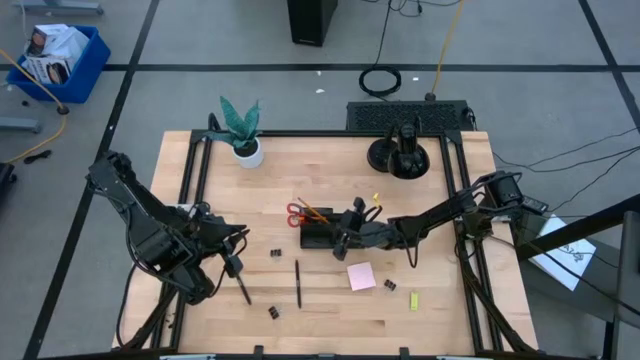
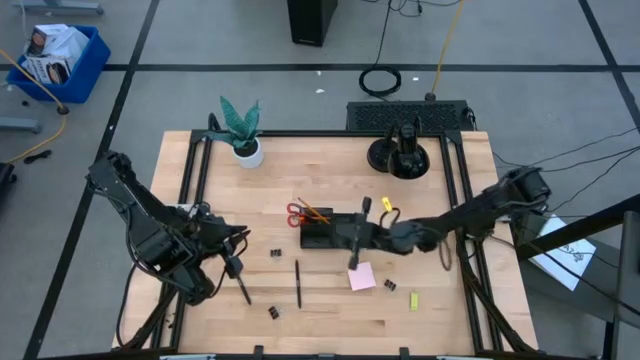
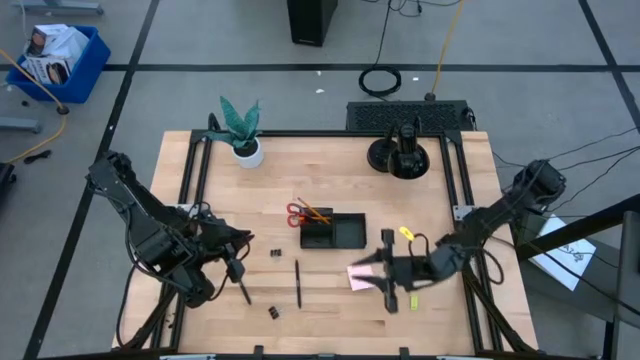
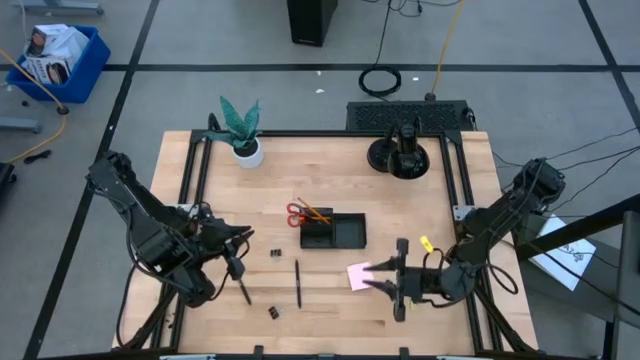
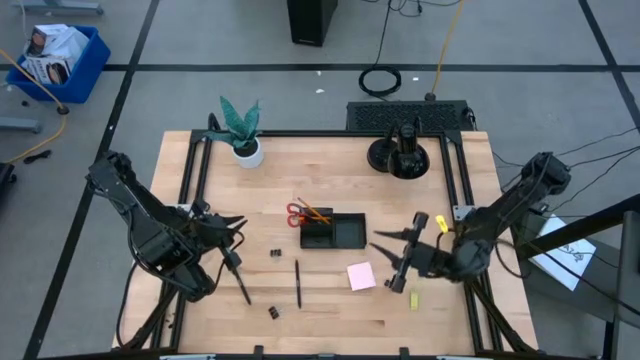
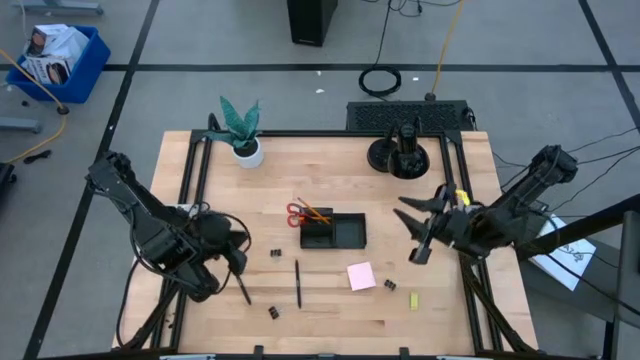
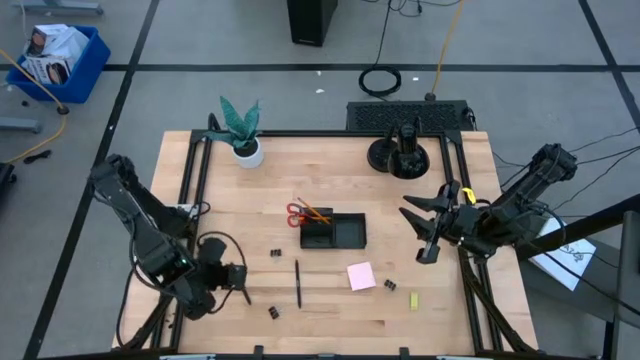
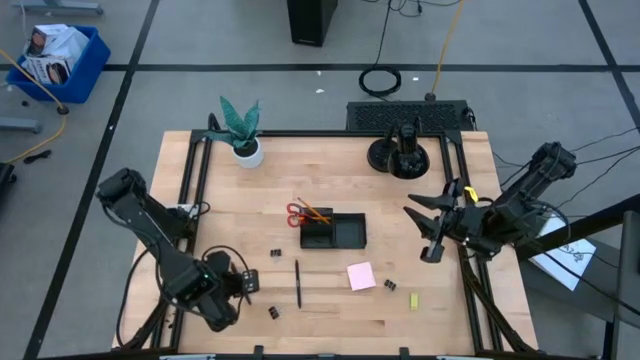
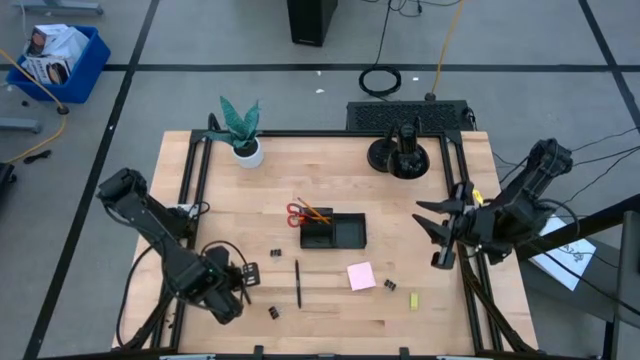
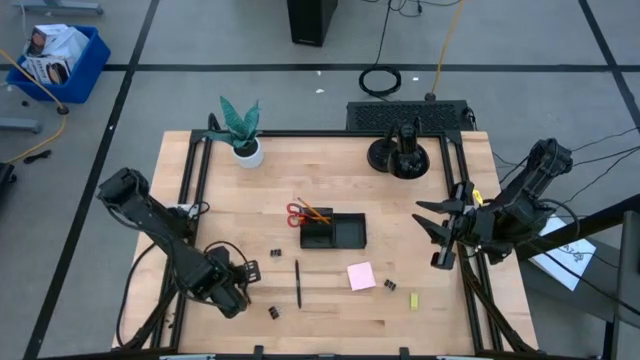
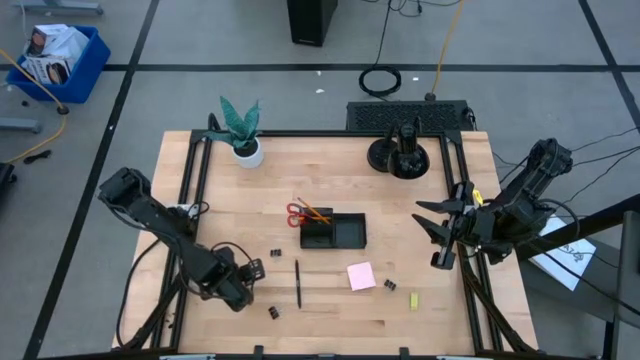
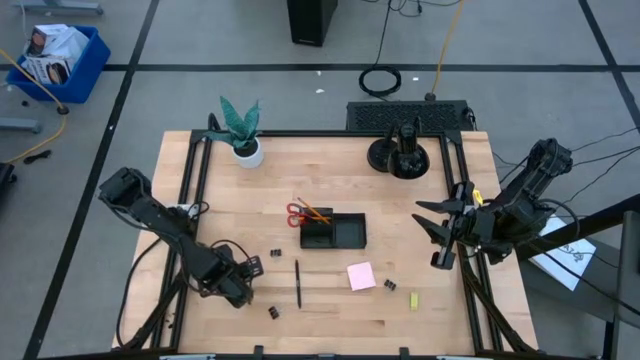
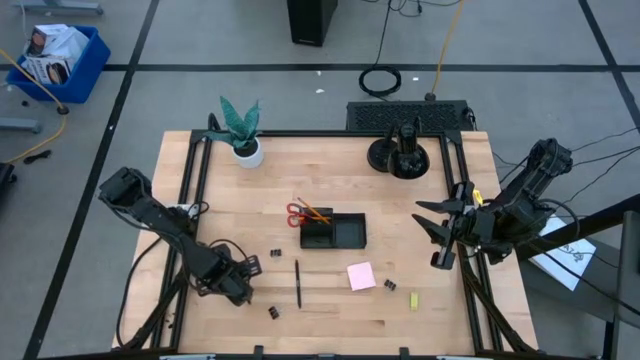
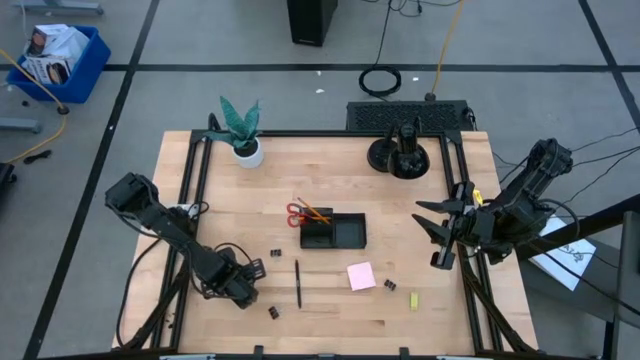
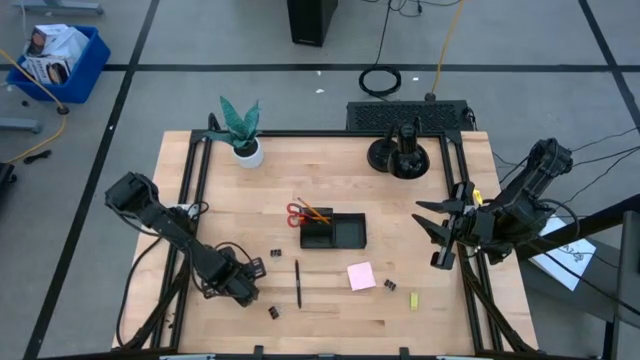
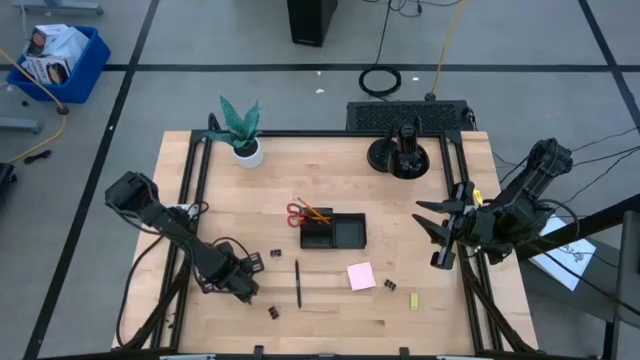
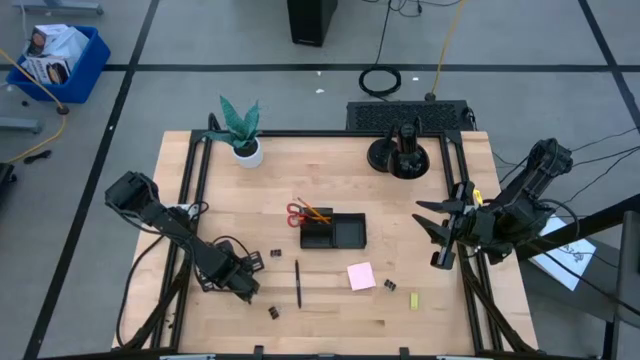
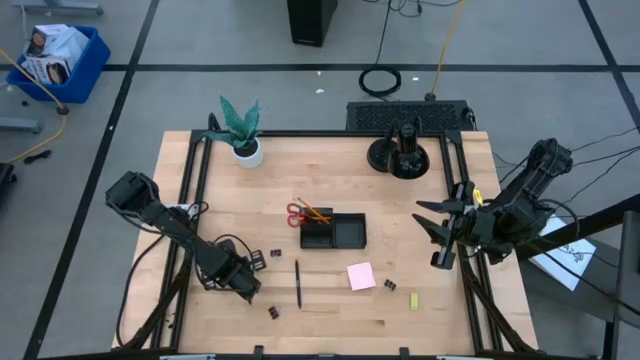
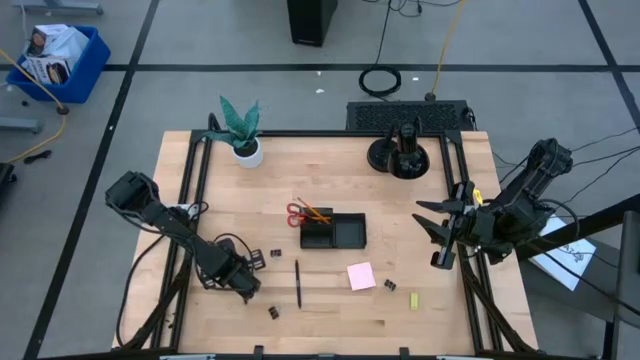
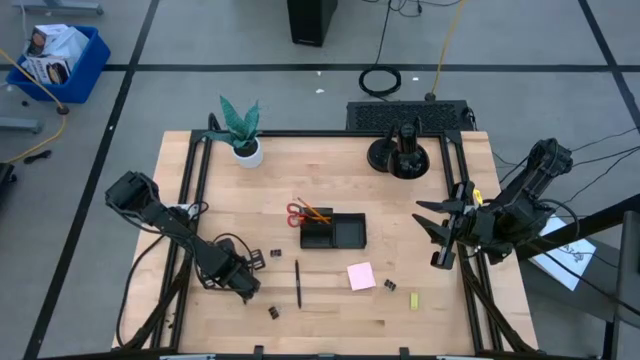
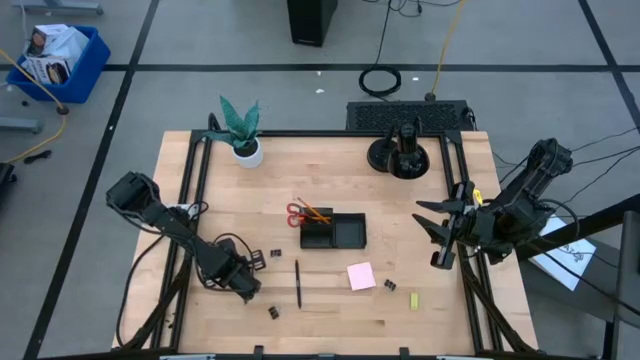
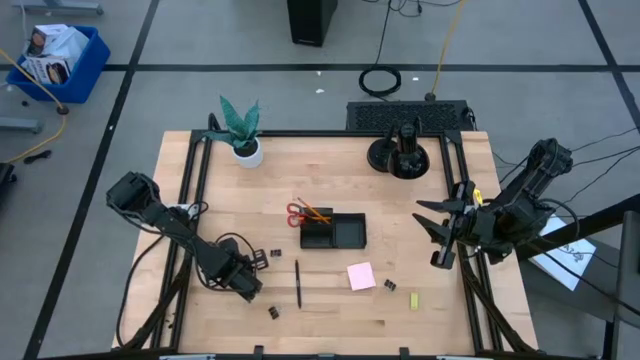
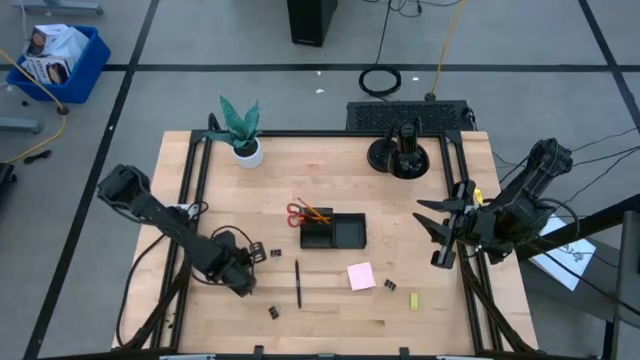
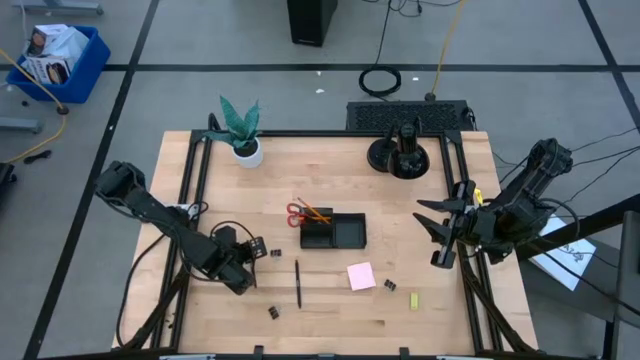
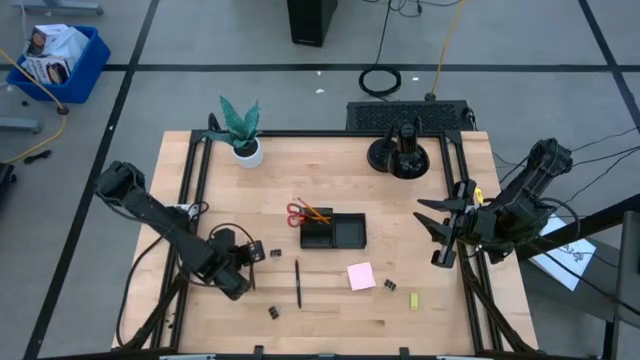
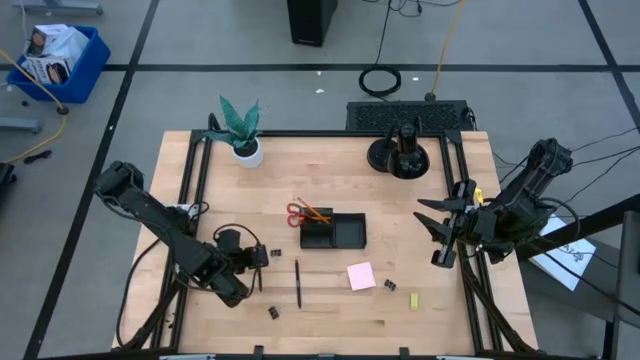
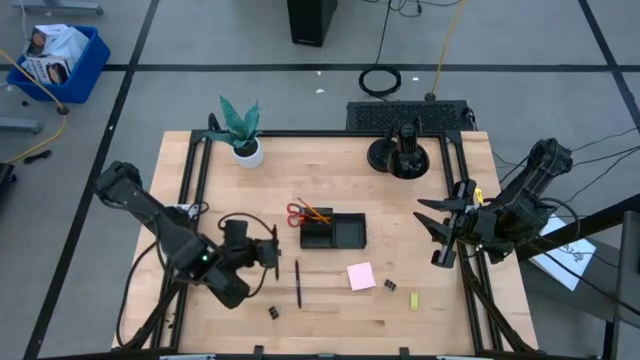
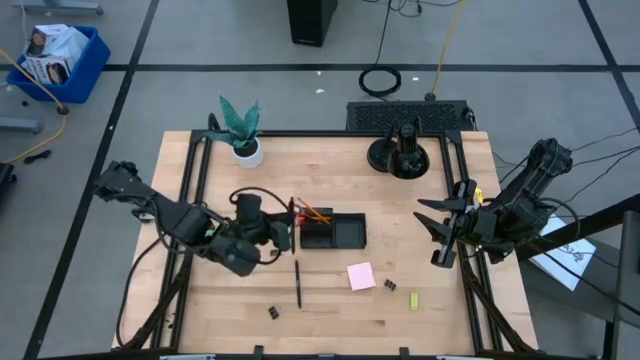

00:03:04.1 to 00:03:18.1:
Task: Pick and place office supplies into organizer
Put the left black pen into the desk organizer

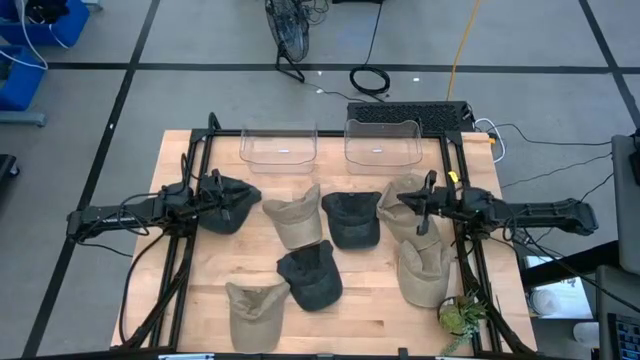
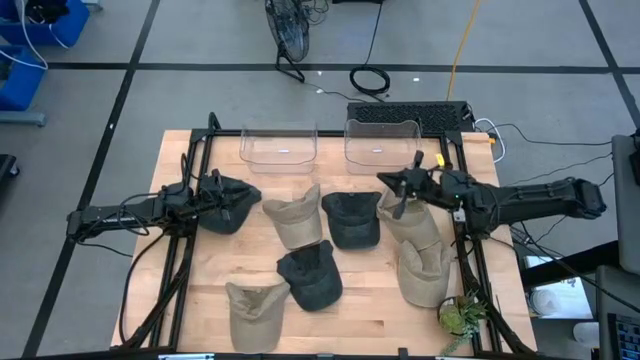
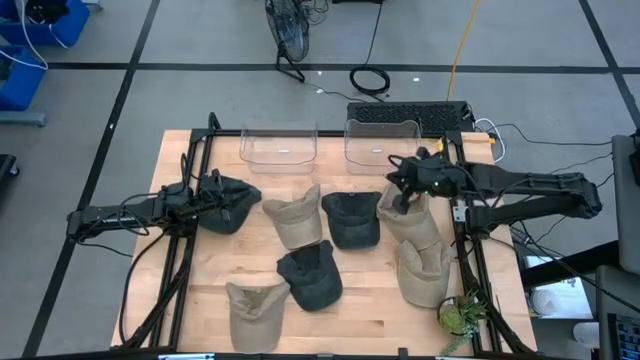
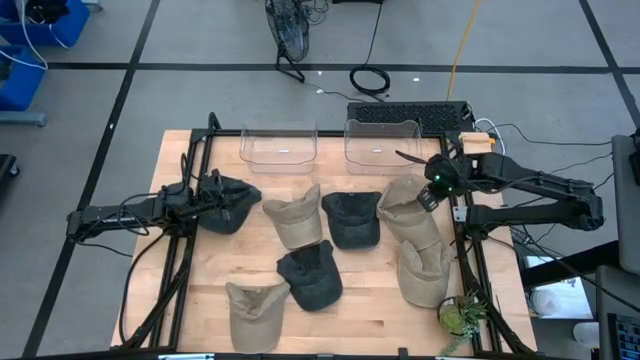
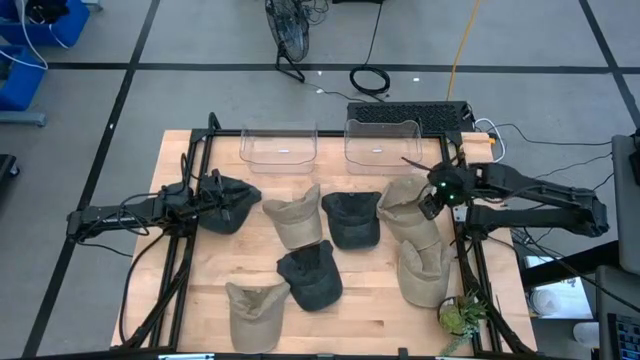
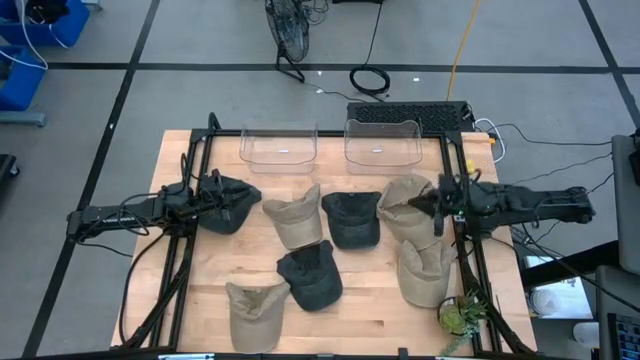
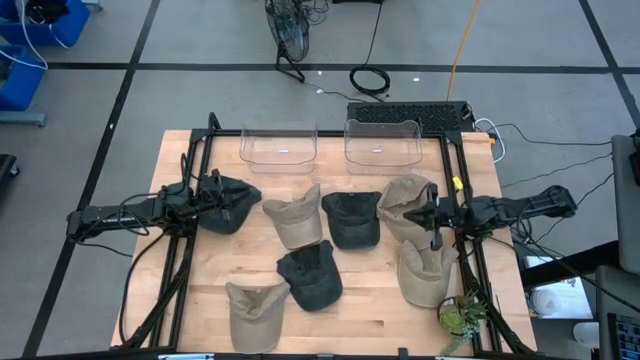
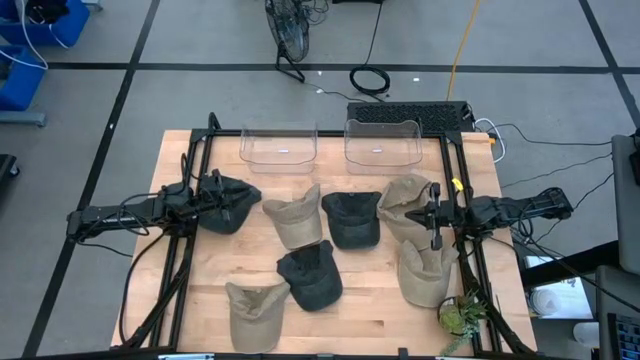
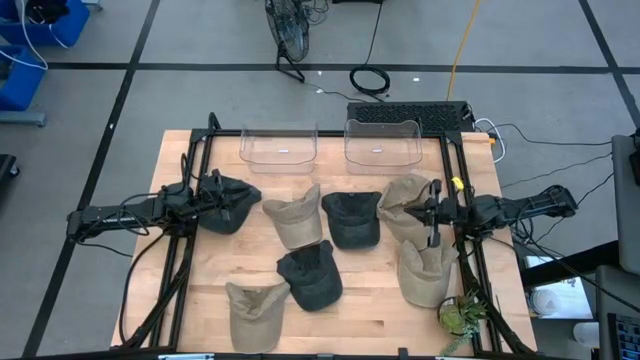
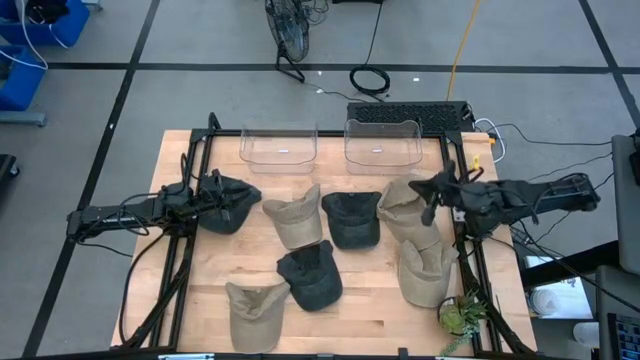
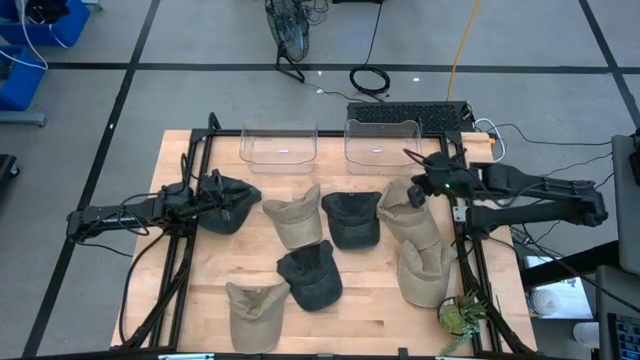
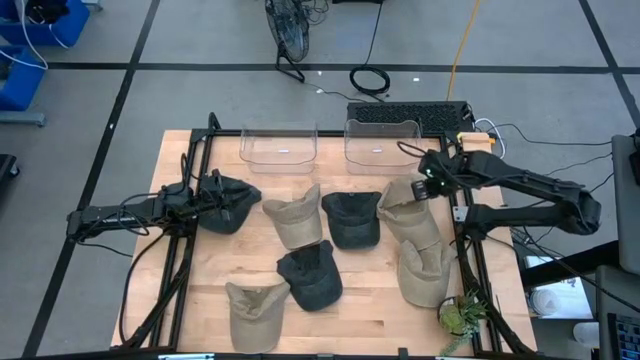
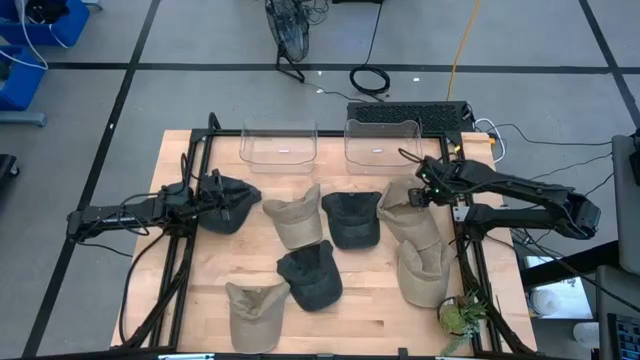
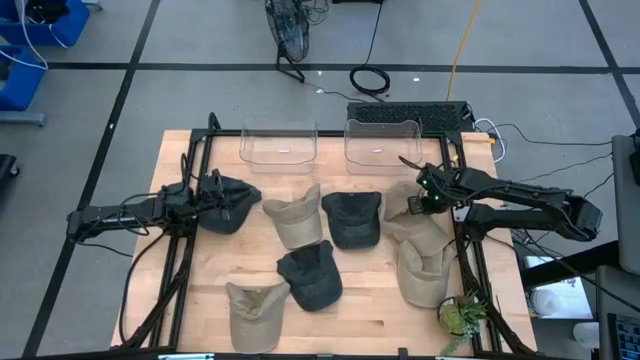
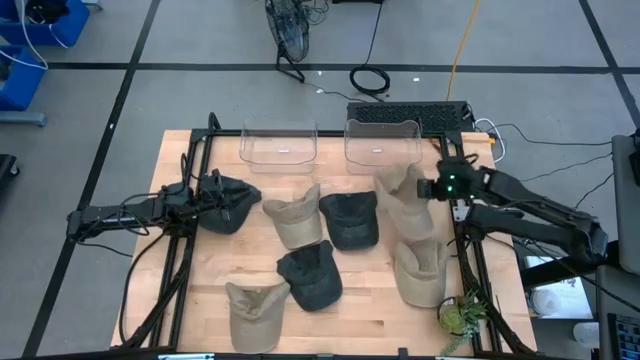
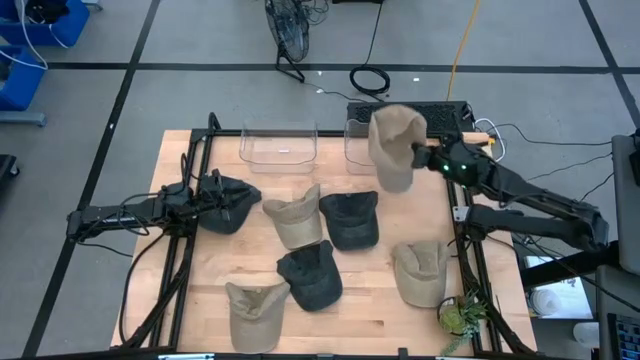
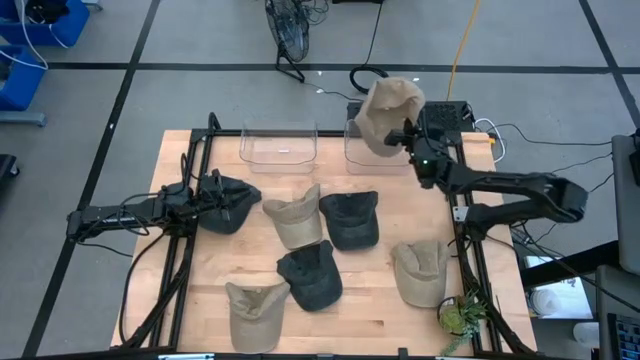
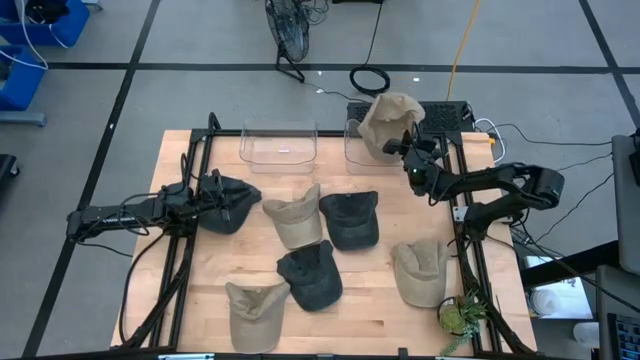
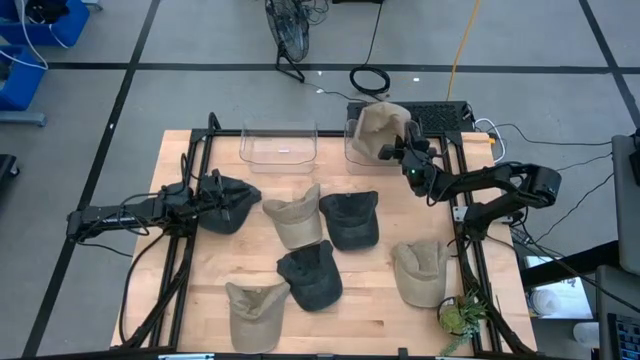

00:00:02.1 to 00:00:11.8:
Task: Pick & Place hat
Put the brown cap into the right transparent bin
